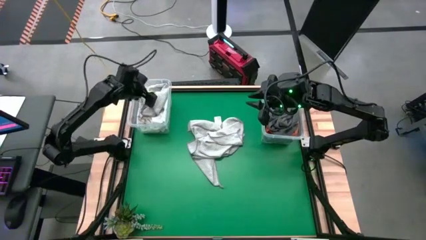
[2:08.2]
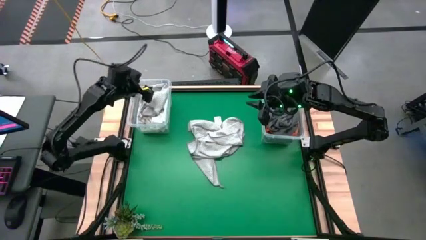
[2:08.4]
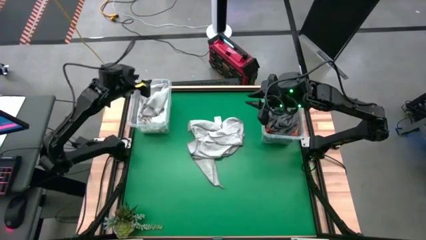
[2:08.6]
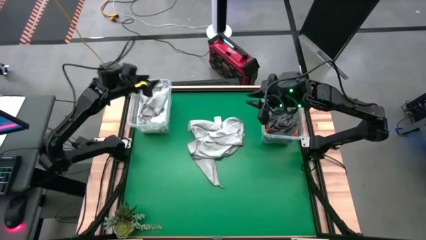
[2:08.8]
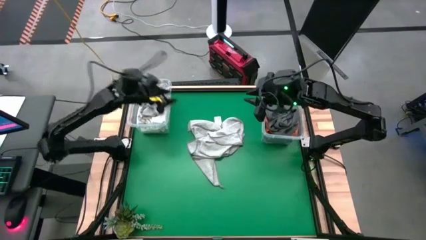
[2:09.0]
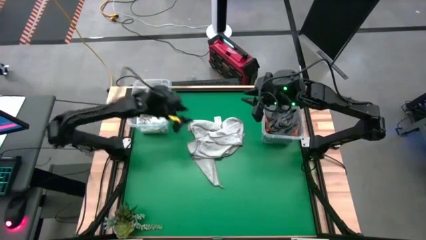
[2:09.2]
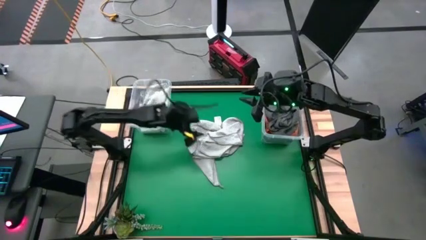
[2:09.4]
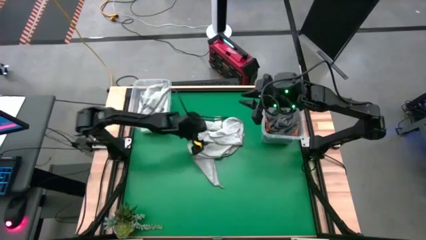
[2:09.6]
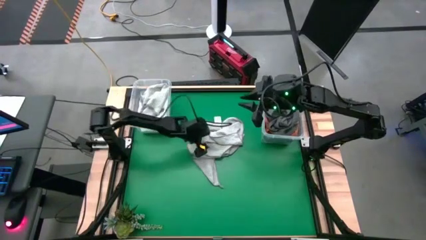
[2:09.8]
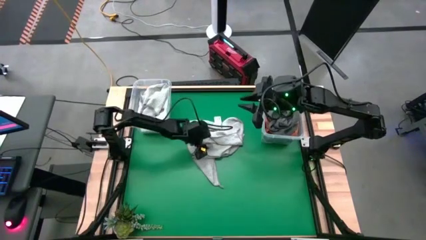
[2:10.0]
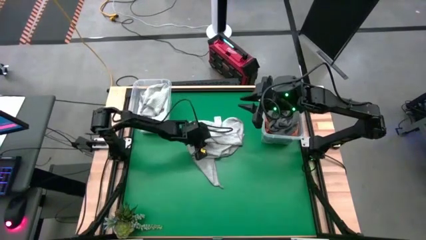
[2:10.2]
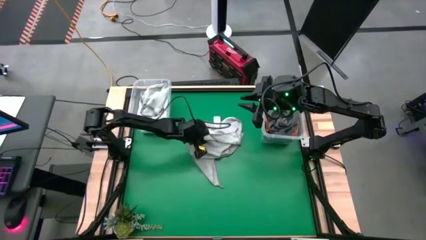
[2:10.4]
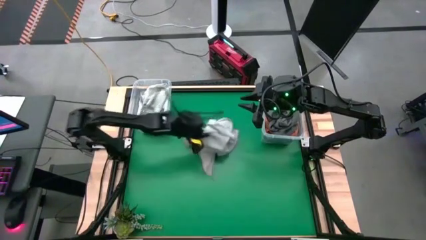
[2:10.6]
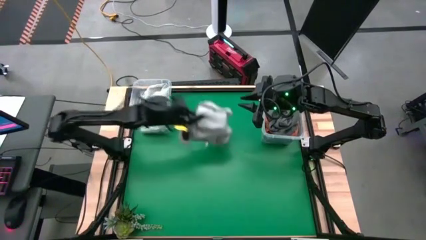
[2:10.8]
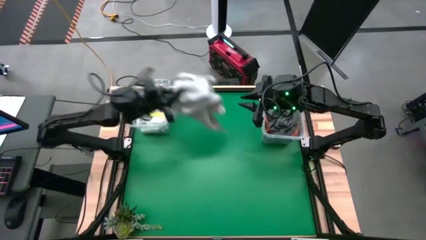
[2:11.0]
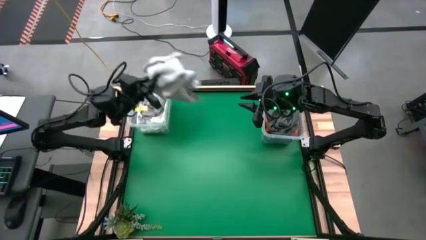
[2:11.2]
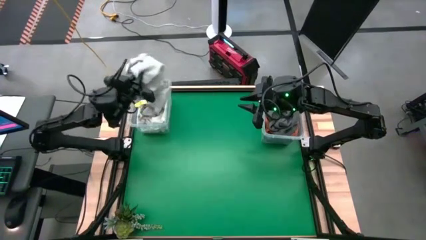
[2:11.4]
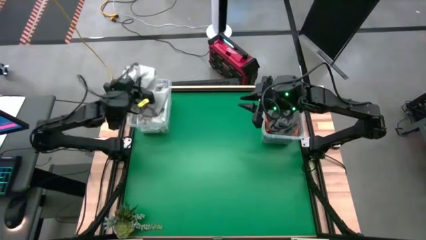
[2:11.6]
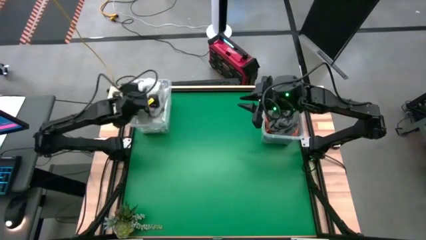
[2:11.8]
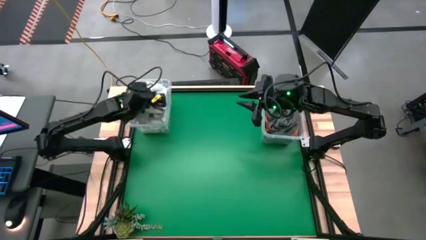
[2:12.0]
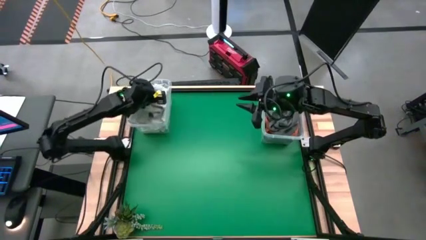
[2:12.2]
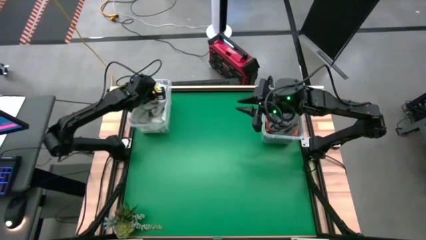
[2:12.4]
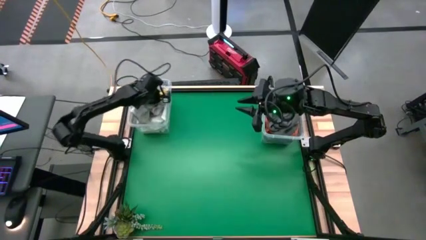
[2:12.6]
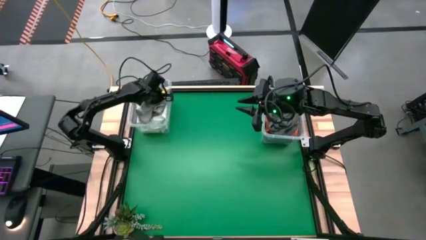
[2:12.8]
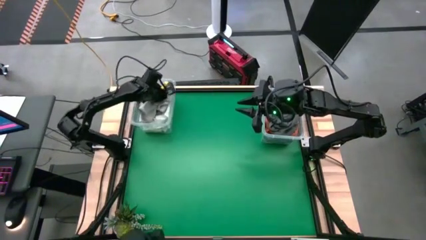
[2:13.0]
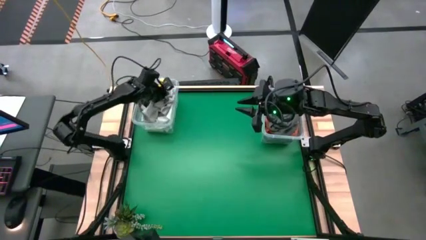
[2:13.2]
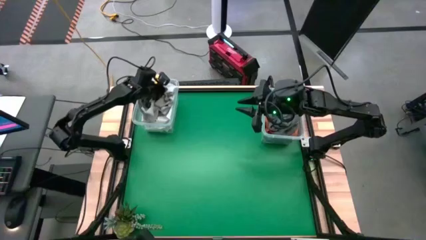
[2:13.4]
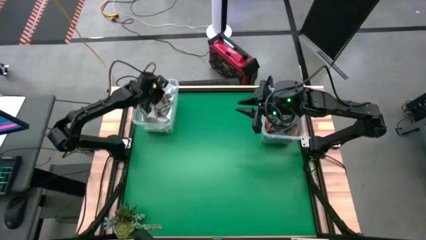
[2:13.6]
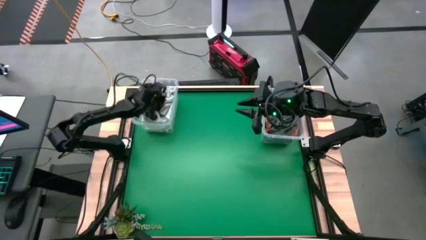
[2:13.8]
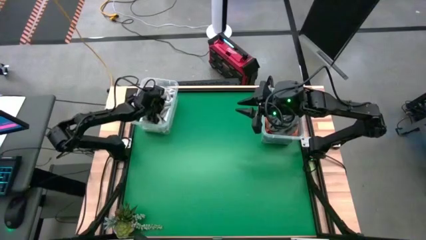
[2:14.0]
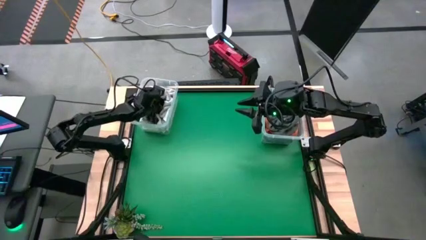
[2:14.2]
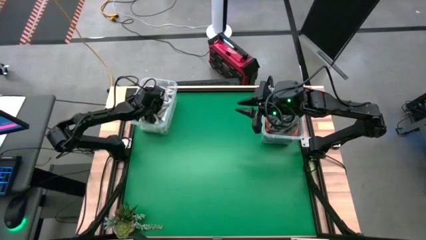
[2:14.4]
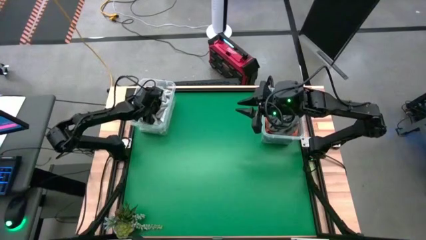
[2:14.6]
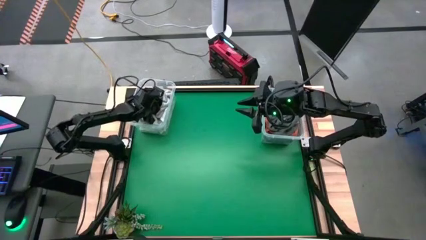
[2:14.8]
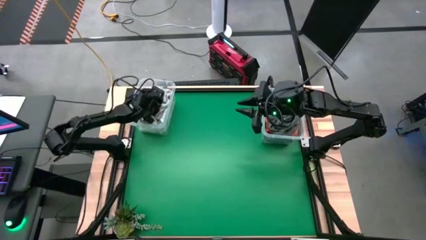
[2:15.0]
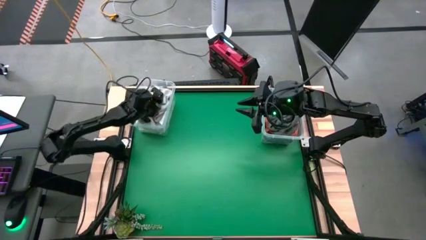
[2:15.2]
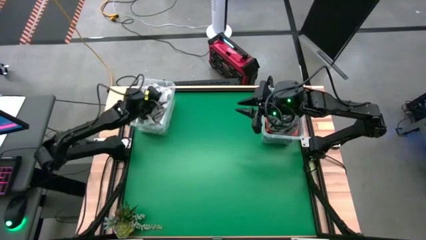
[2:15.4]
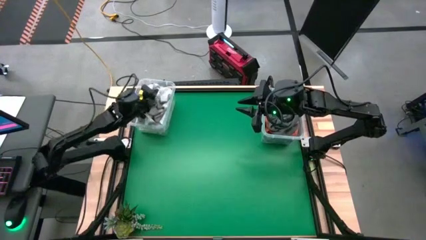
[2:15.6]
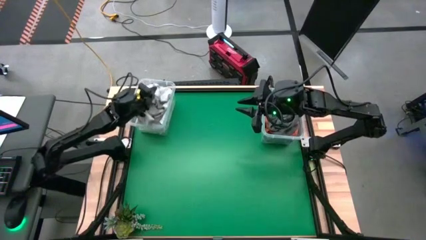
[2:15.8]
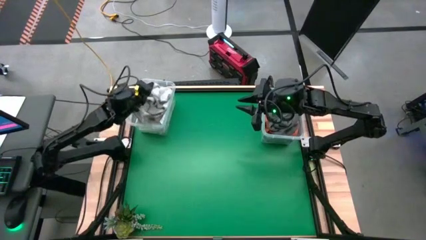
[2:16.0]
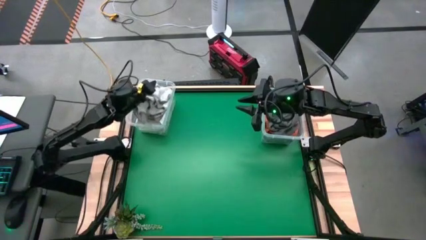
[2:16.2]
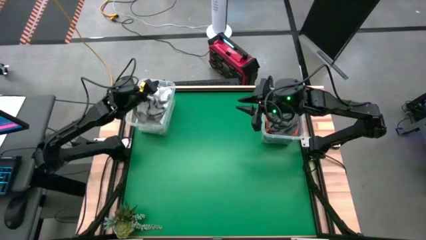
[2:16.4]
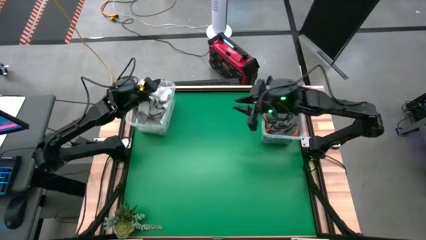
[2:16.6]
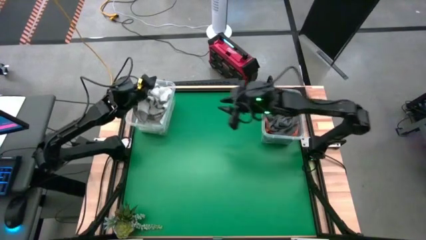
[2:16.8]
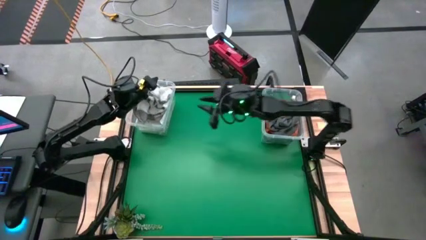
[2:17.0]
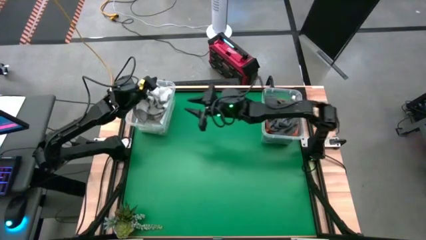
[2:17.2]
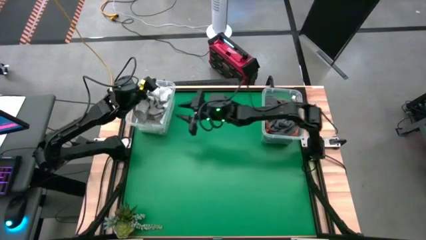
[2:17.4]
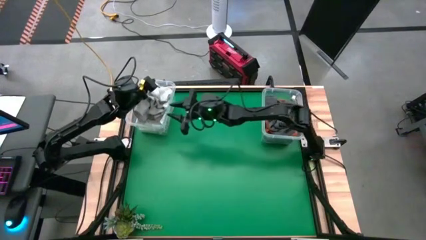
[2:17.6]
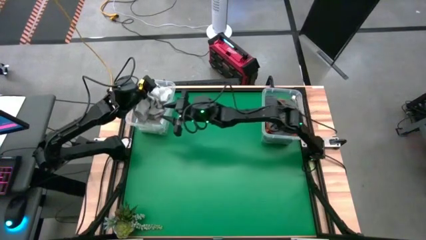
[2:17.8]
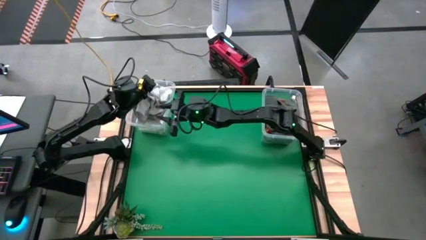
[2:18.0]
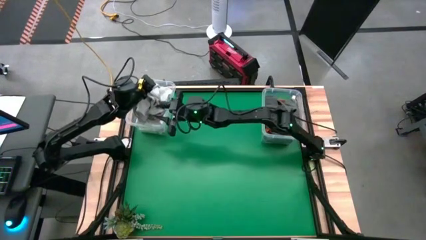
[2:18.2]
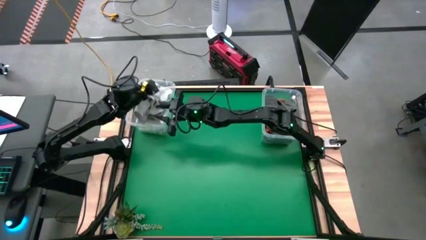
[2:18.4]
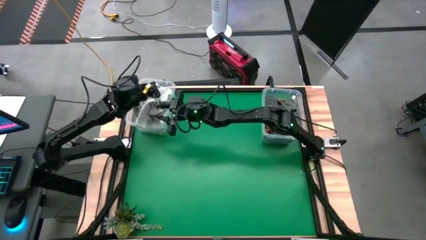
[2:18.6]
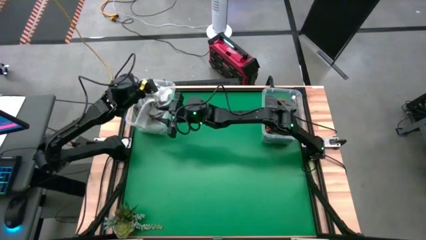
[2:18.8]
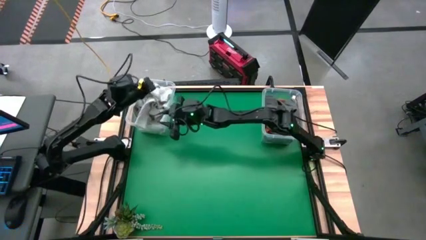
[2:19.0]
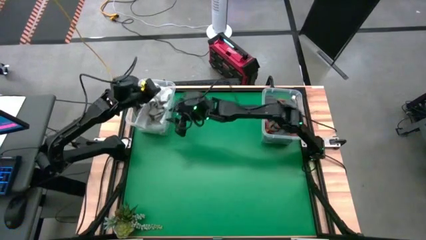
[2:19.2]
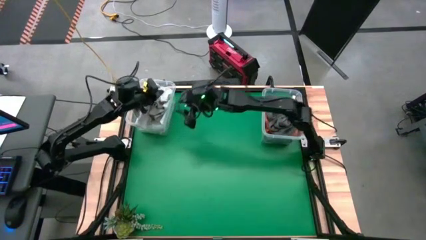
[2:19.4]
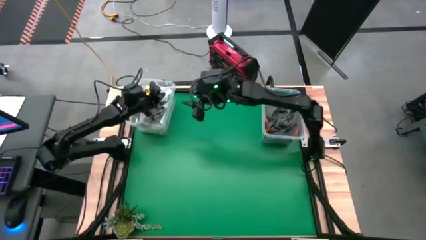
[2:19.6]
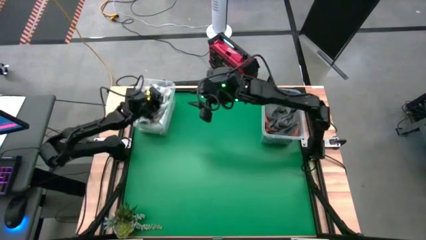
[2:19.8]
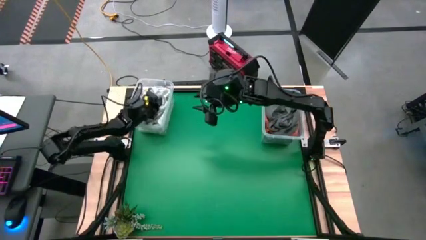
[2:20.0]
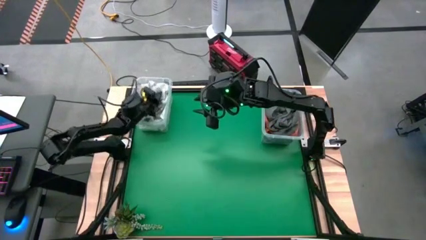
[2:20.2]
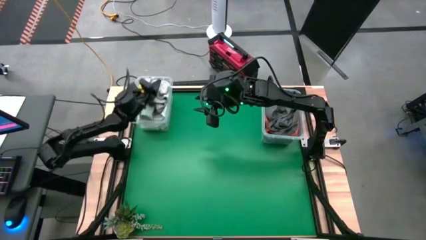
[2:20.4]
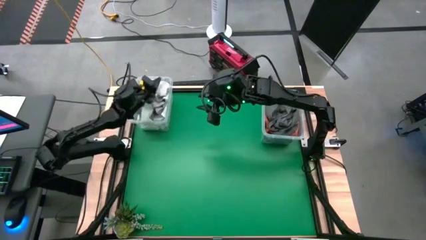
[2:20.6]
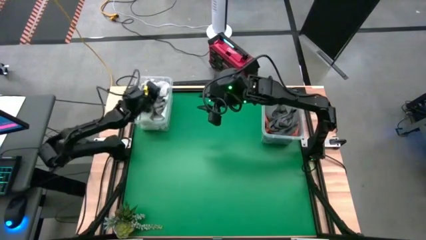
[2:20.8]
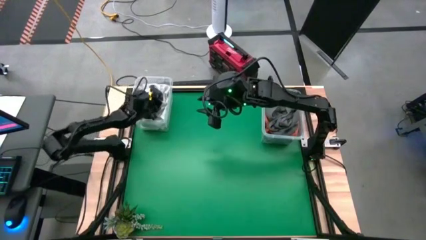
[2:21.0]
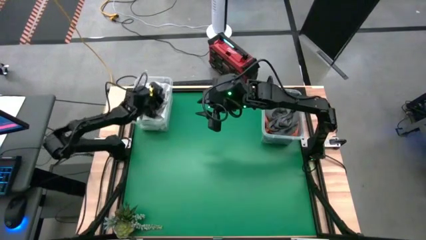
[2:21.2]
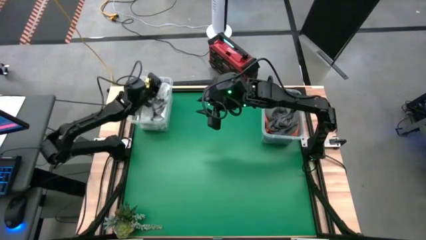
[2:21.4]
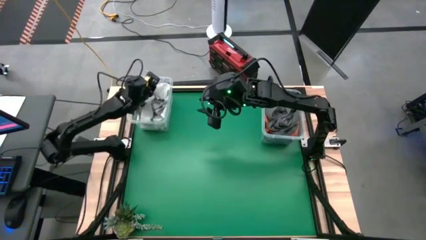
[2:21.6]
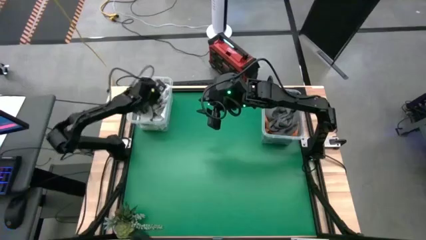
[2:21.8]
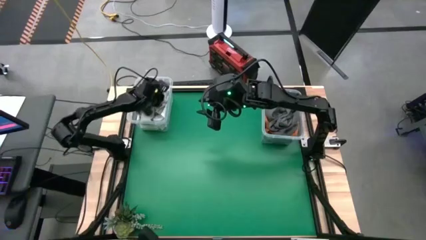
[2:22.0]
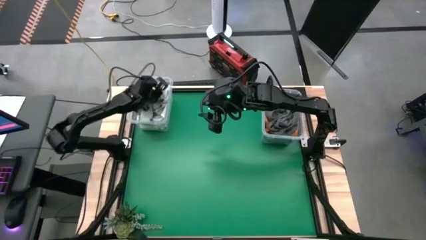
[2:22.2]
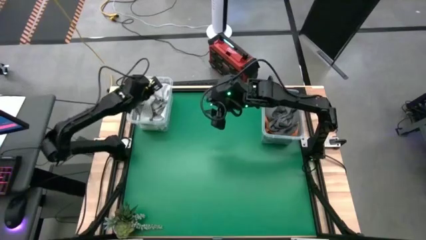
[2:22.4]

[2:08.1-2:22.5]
Task: Sort towels by color in basket
Put the light gray towel into the left transparent bin

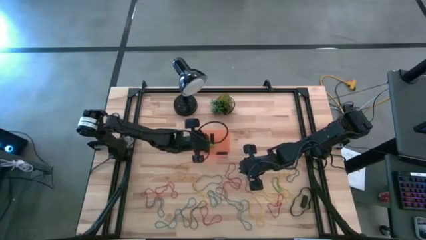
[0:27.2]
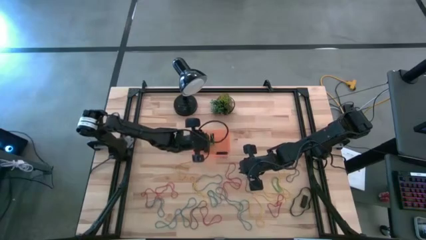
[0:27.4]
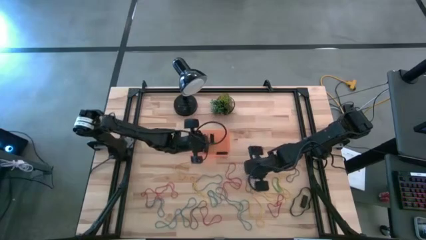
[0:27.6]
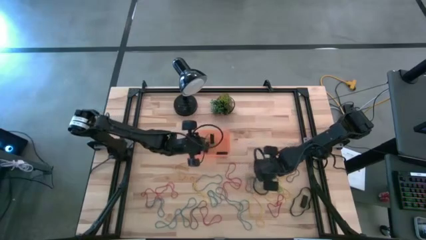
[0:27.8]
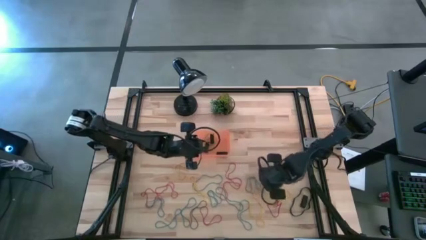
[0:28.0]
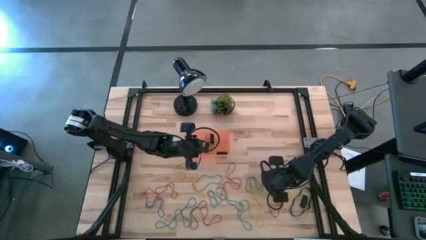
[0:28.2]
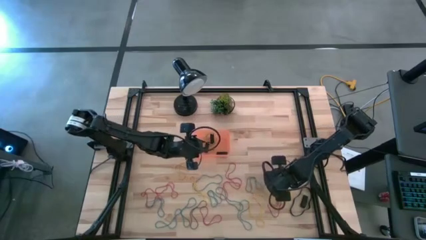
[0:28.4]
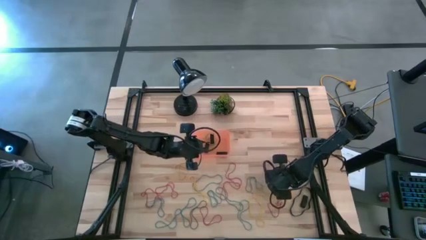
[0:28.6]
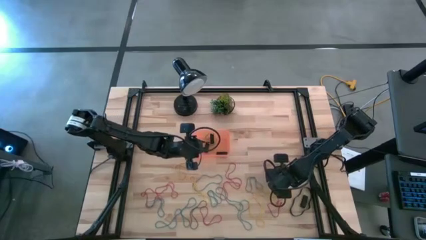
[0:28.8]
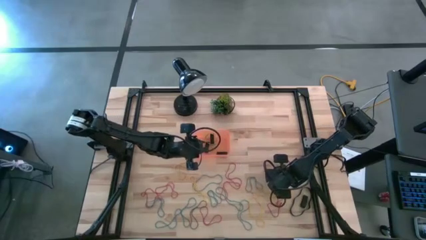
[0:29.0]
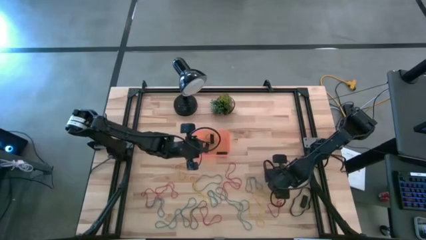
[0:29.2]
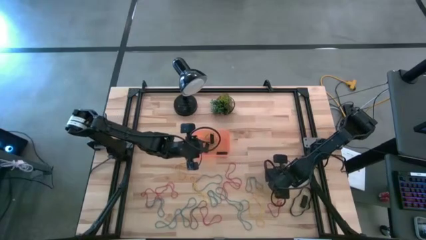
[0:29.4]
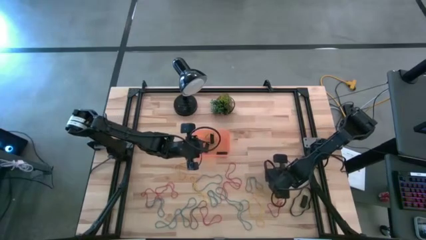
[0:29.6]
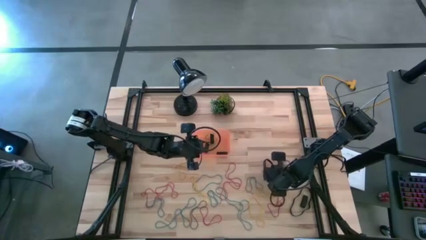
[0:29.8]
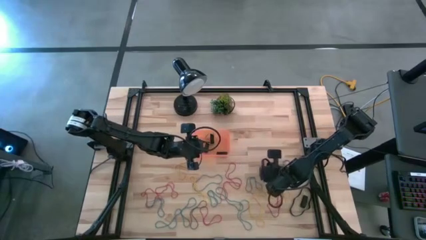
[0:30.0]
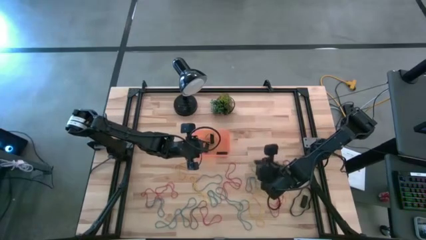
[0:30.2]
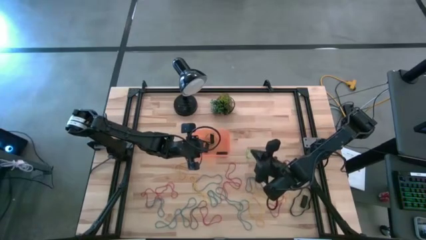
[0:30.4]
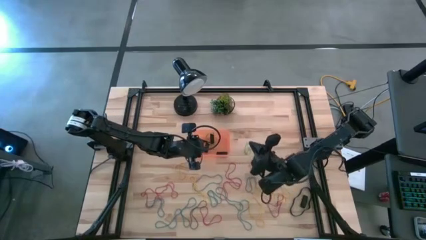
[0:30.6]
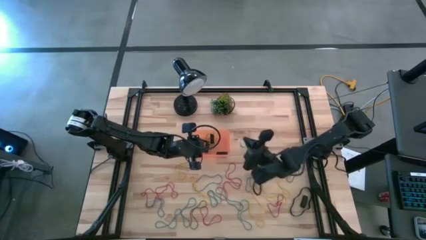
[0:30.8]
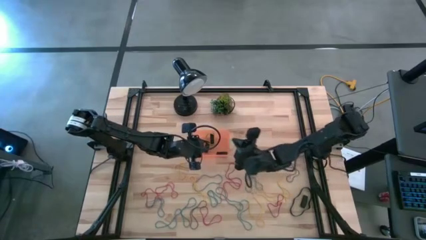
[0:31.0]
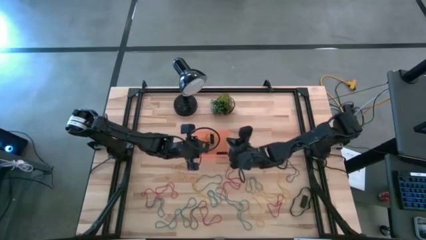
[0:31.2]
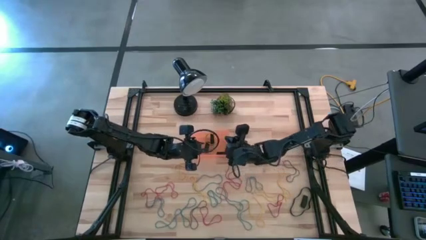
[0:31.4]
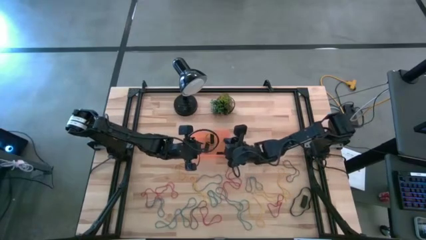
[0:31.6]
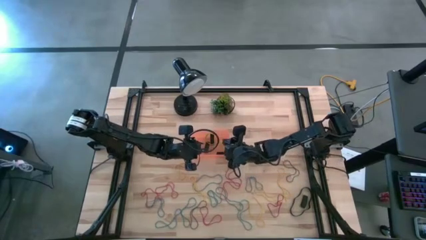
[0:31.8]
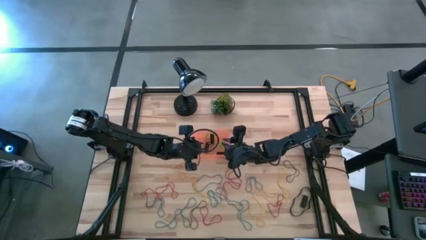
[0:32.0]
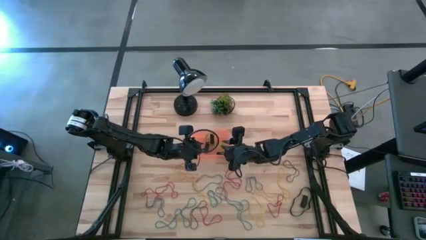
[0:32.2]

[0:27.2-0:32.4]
Task: Pick and place rubber bands into bin
Put the green rubberband into the orange bin
